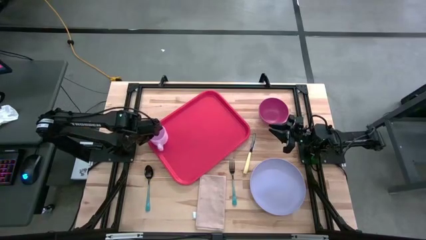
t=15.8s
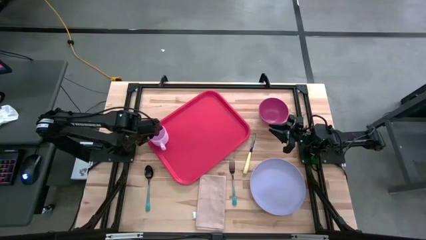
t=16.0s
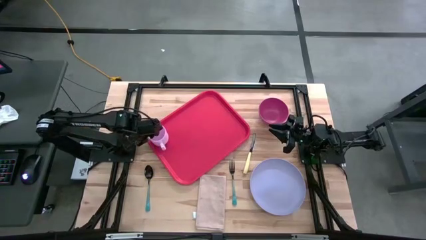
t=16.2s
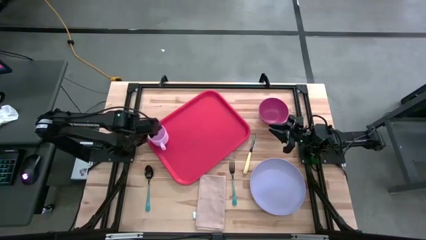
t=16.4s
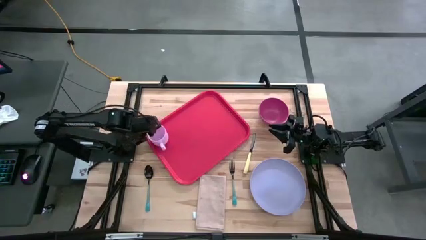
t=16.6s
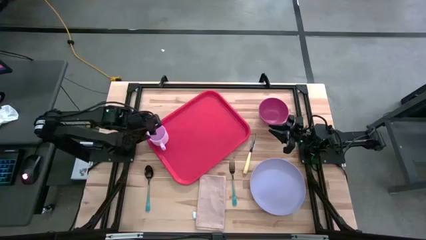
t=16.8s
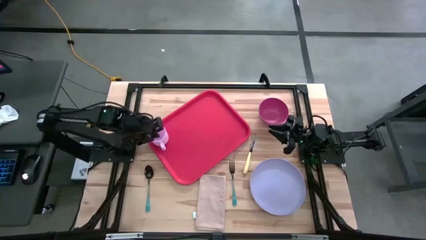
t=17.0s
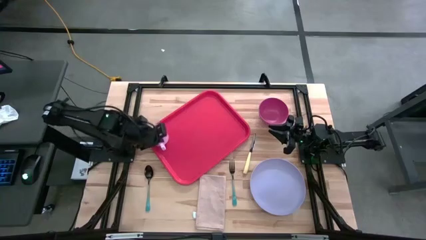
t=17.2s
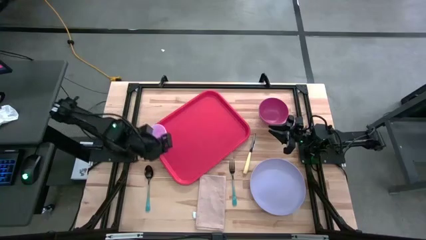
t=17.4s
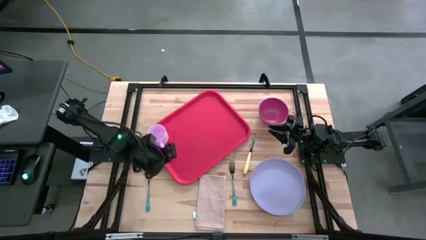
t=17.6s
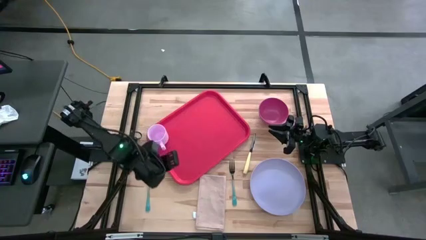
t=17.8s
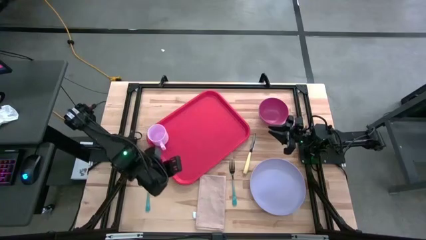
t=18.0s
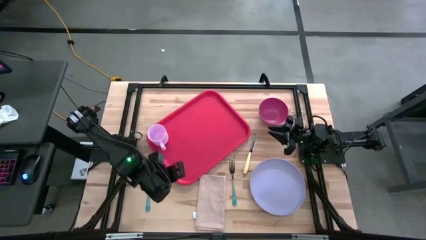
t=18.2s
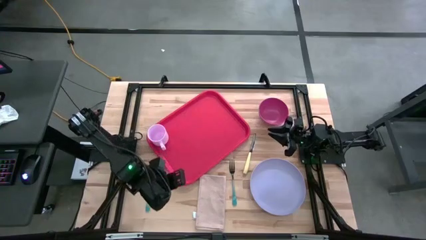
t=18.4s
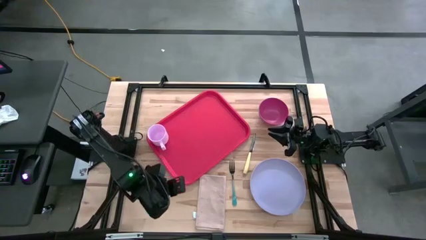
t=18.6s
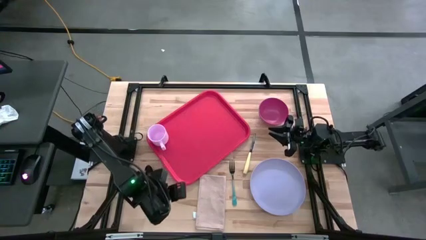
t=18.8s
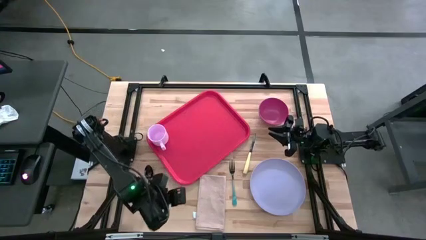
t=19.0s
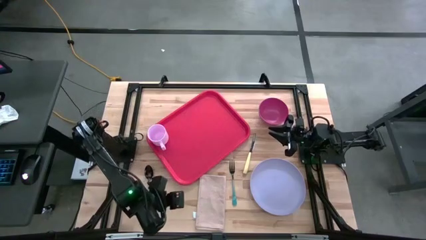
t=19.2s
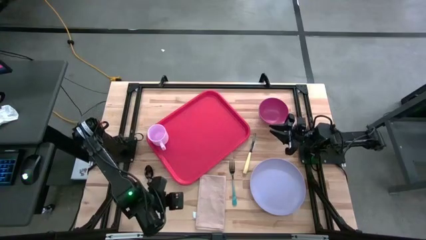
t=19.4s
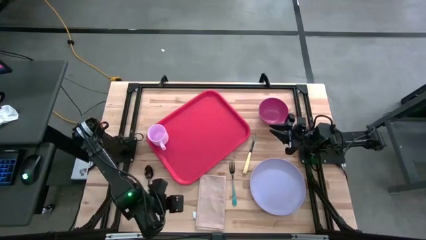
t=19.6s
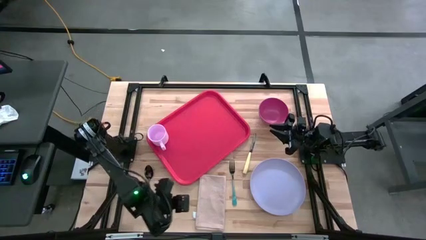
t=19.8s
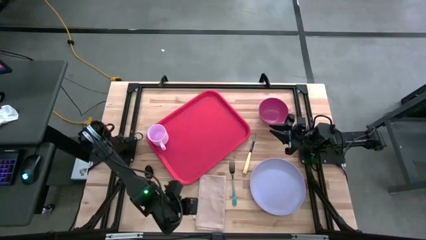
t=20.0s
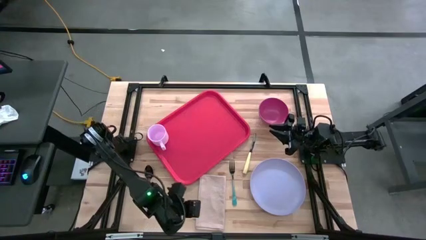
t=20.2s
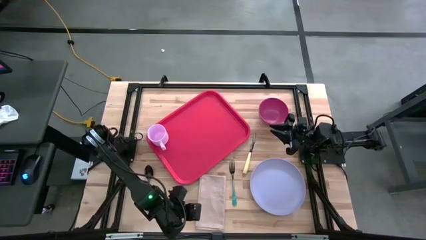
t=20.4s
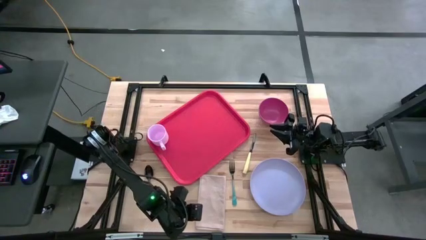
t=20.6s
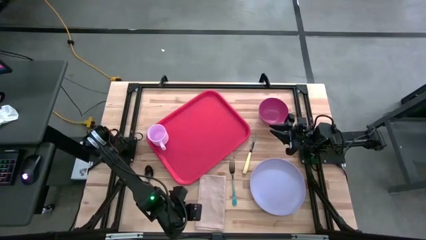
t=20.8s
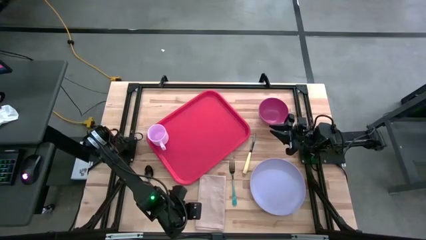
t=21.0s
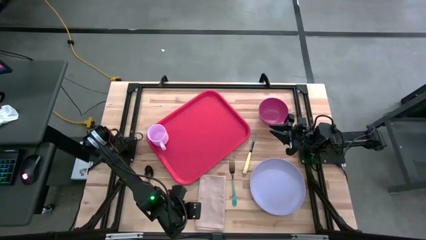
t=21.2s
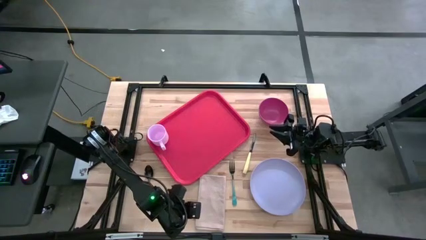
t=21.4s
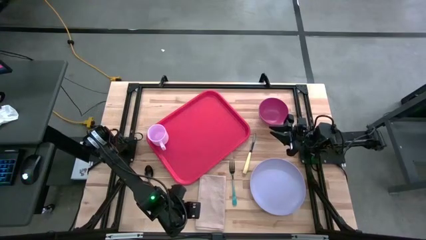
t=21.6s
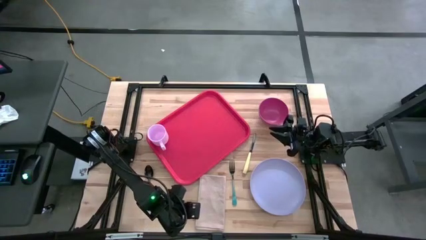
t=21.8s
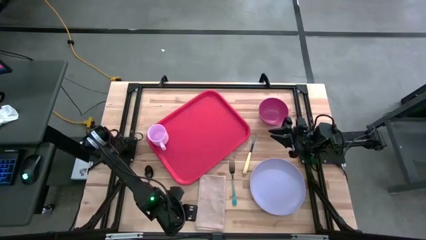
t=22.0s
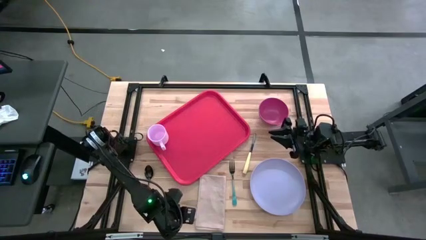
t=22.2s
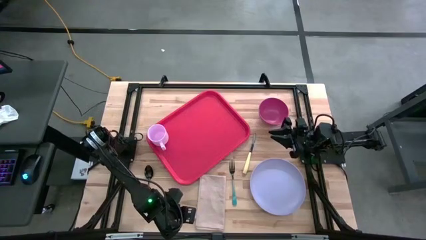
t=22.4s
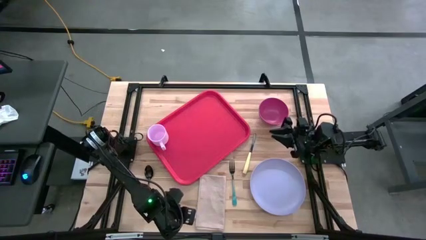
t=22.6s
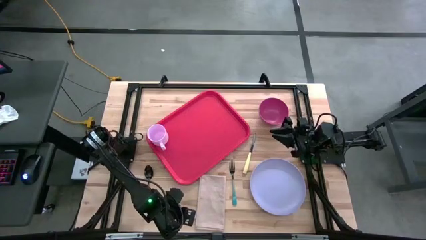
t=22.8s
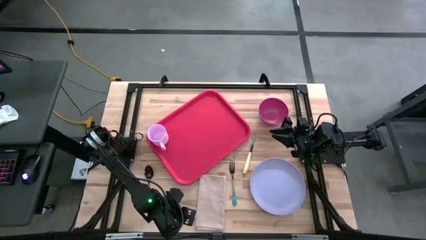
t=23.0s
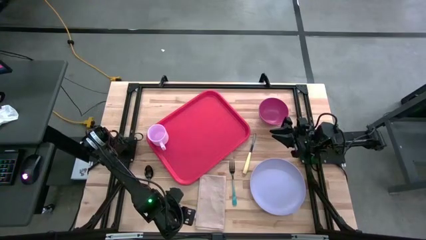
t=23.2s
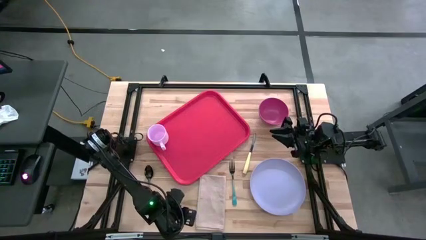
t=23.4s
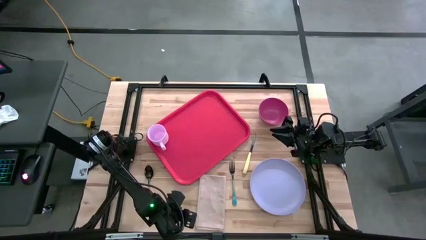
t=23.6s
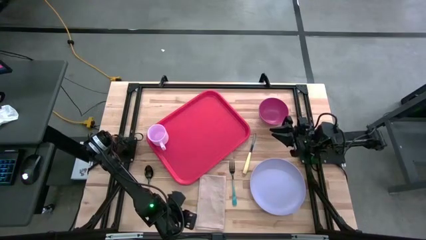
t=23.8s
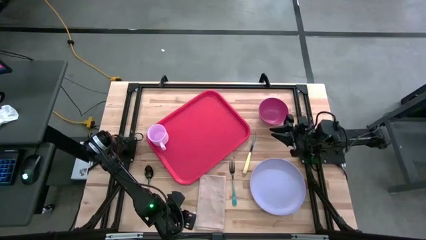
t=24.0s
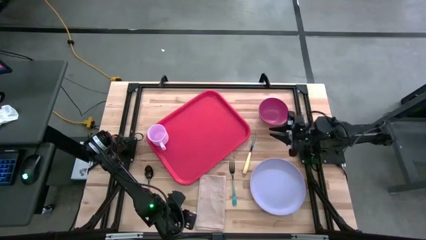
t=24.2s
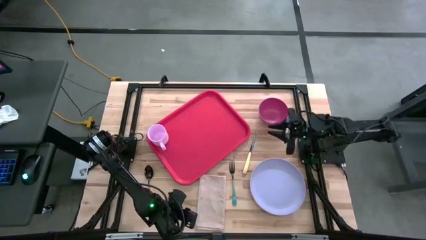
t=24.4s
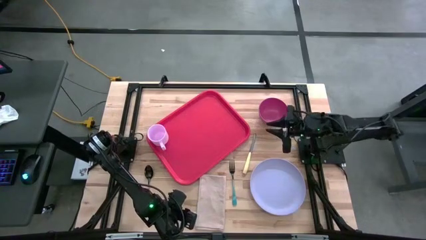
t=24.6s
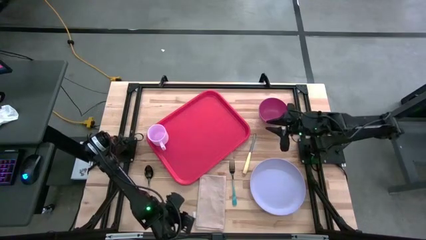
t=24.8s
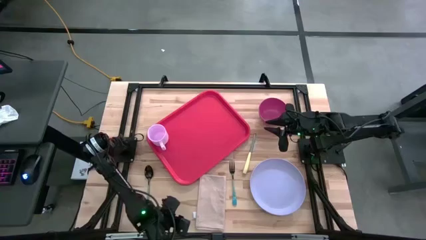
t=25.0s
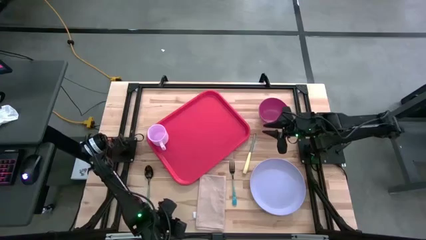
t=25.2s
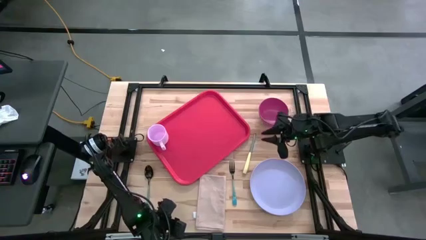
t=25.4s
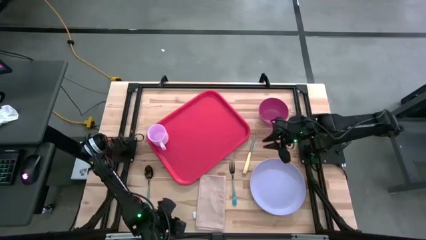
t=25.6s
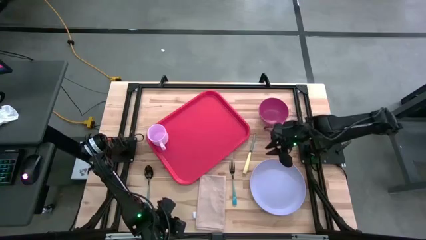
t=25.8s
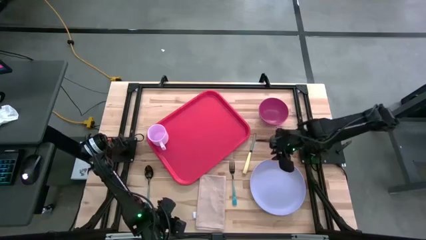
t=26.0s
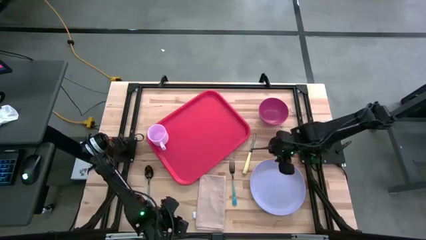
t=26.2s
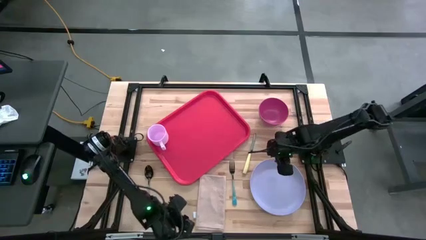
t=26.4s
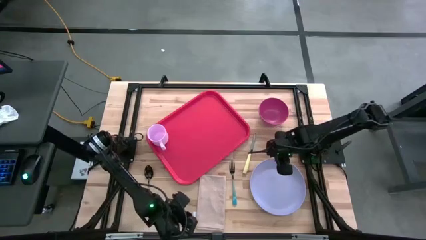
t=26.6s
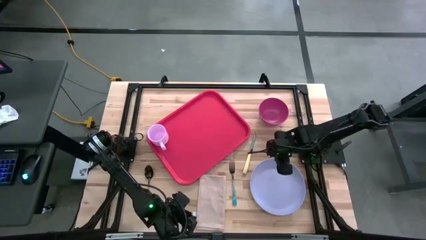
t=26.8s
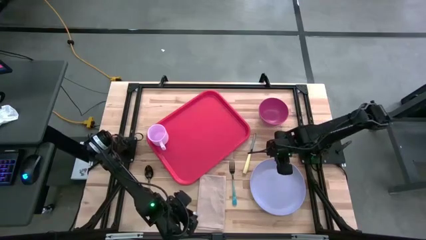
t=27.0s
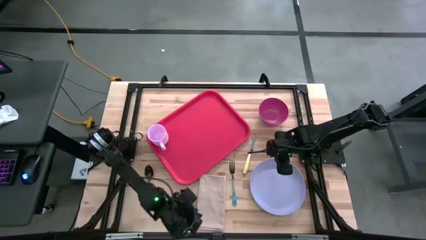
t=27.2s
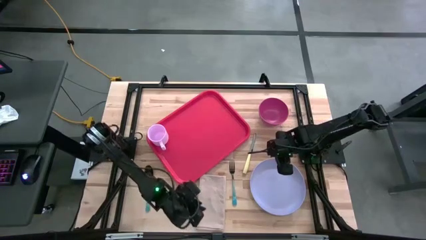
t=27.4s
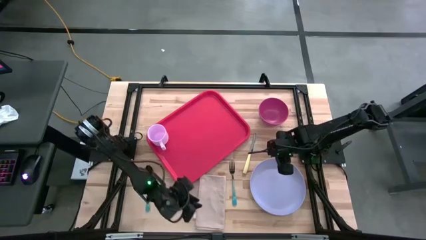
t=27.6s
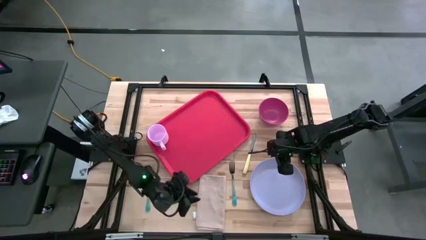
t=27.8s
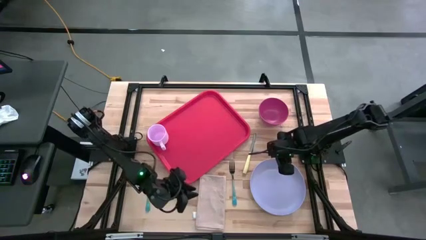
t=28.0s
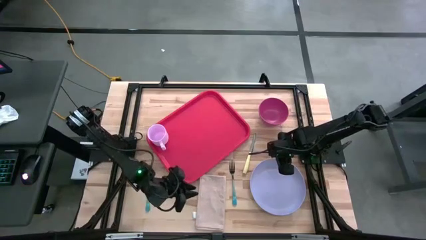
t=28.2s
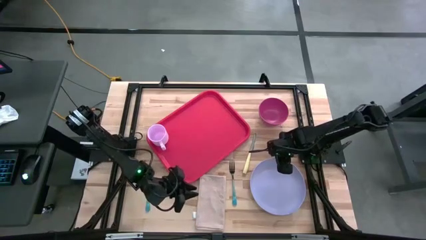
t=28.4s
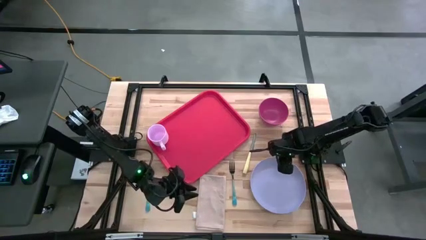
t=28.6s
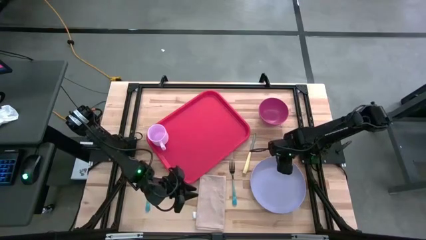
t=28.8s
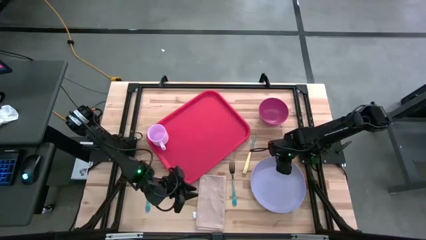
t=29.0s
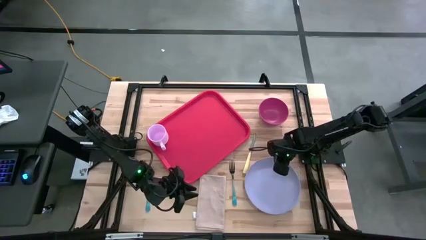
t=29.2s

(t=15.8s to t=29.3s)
Task: Set up tray
Put the purple plate to the right of the light pink mug on the red serving tray

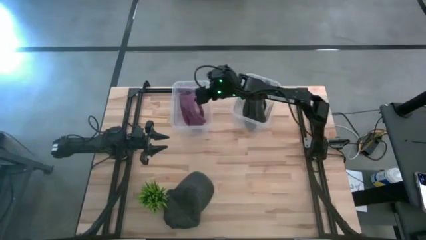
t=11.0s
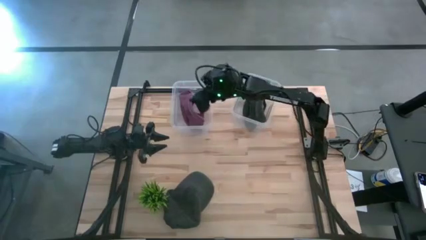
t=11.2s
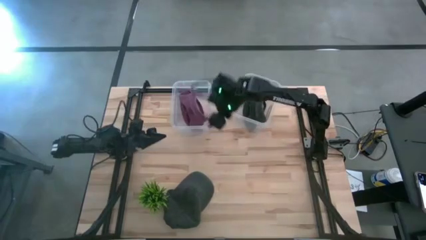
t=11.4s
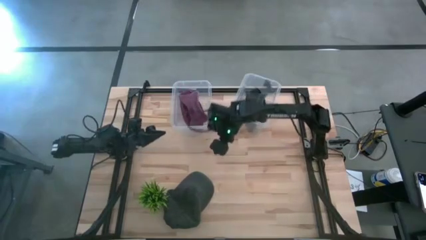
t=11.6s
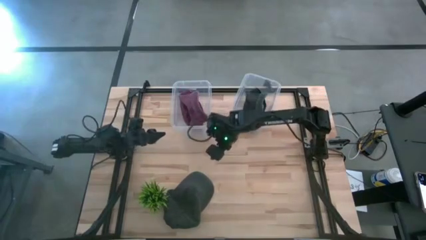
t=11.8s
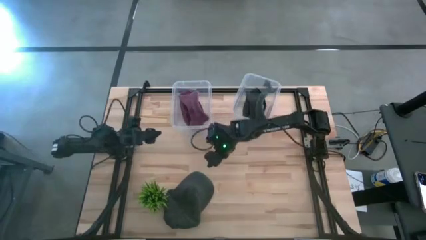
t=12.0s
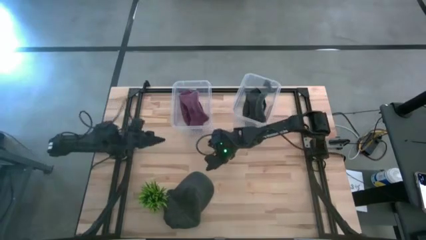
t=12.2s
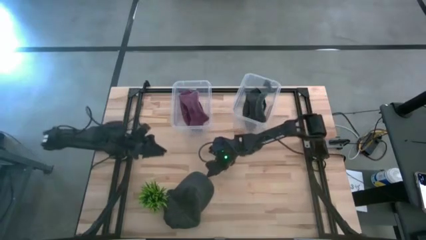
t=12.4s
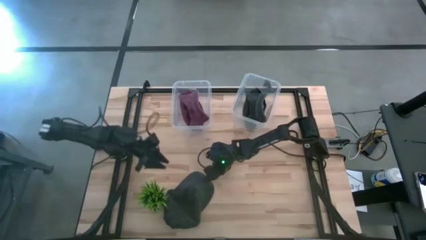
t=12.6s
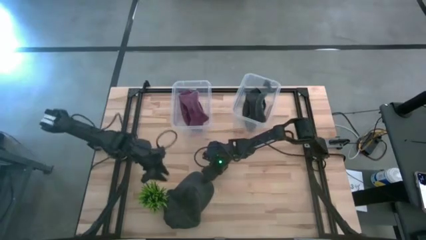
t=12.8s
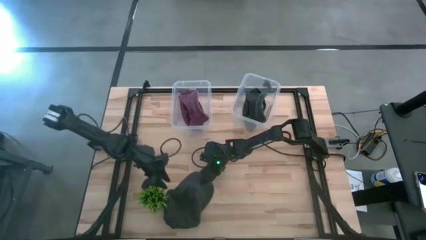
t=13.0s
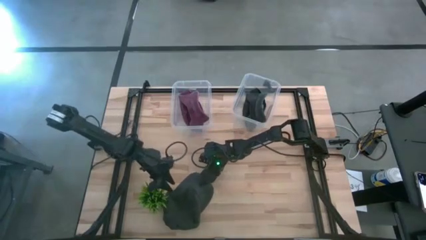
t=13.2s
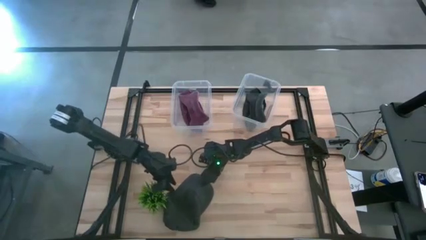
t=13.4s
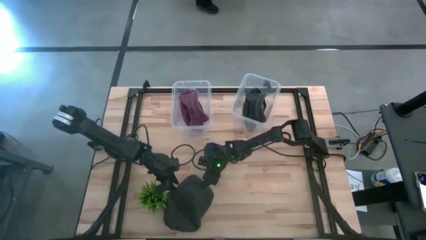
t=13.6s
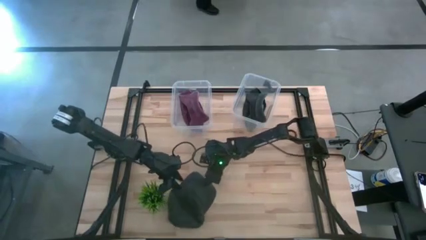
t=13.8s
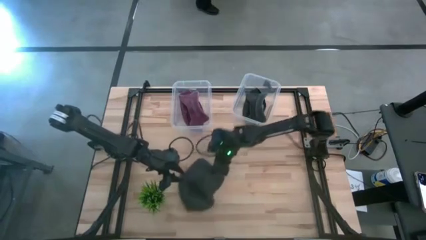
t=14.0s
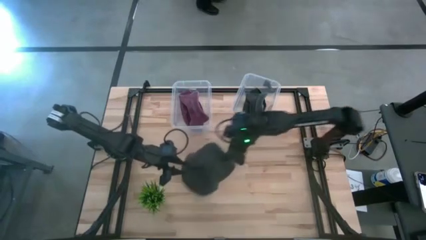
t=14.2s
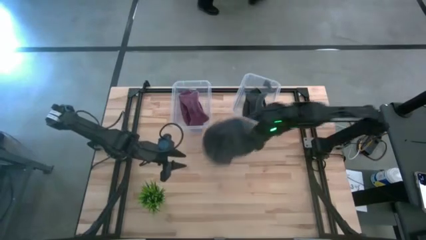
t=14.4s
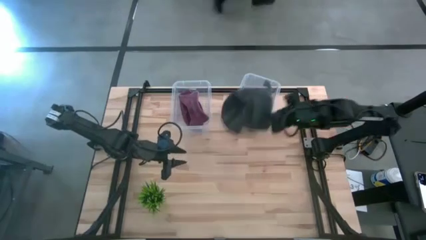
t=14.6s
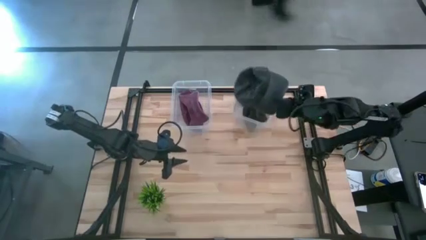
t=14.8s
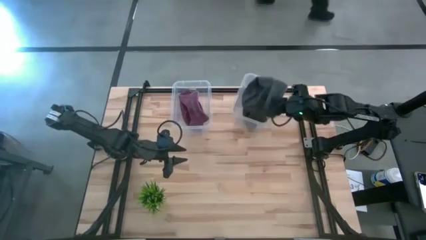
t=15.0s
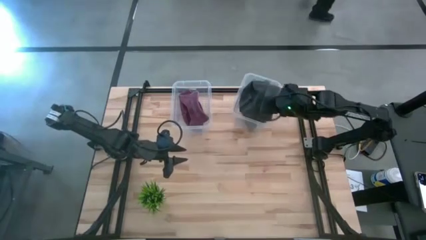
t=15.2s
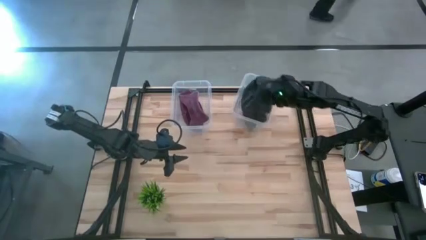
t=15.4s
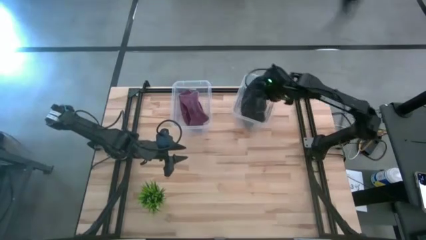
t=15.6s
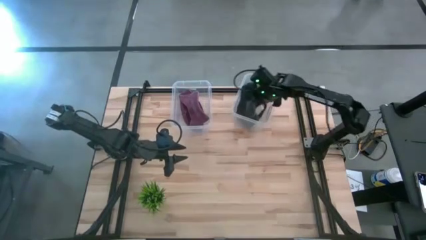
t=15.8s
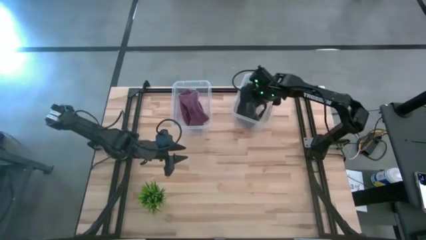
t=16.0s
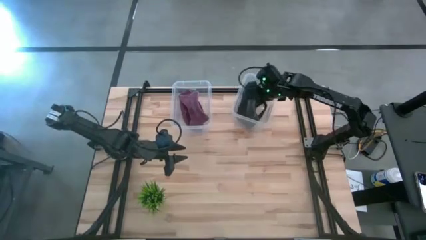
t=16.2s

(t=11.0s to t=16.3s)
Task: Pick & Place hat
Put the black cap into the right transparent bin
